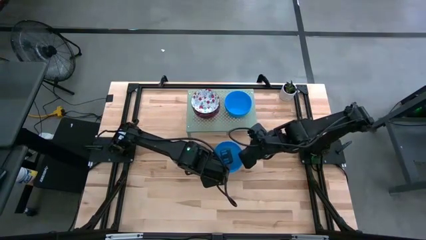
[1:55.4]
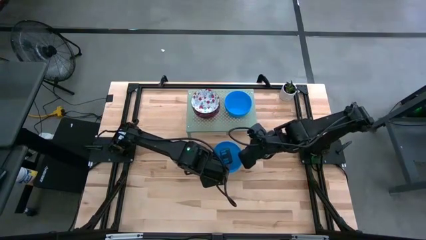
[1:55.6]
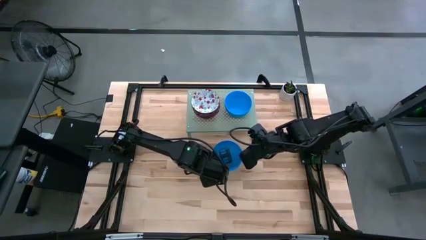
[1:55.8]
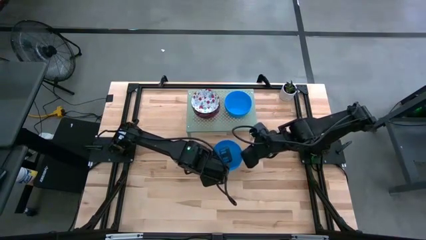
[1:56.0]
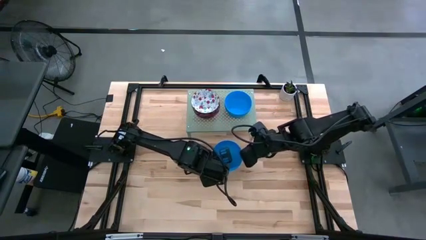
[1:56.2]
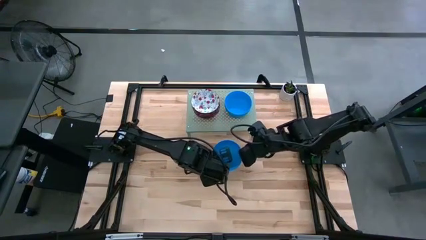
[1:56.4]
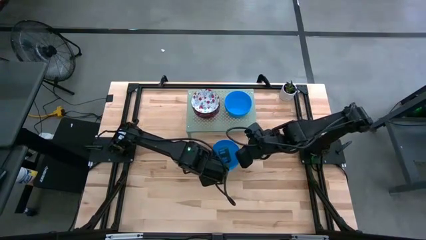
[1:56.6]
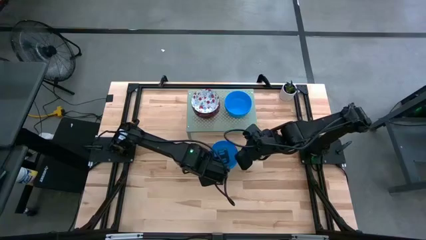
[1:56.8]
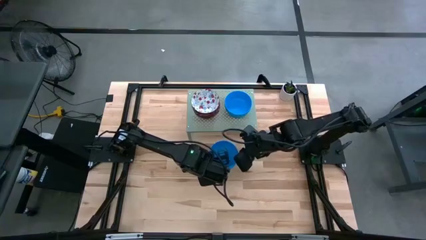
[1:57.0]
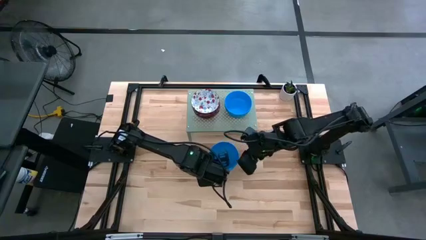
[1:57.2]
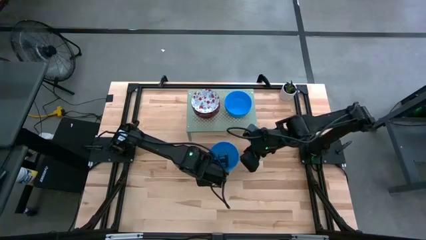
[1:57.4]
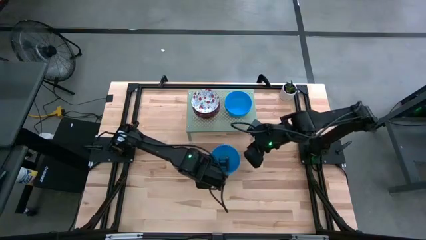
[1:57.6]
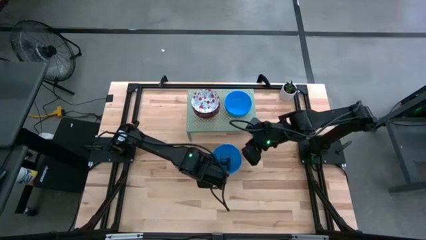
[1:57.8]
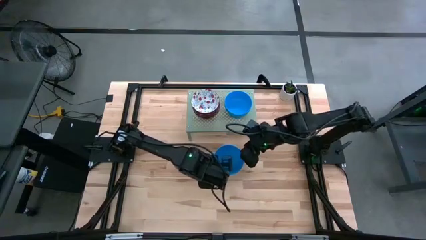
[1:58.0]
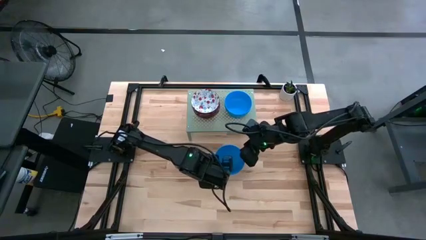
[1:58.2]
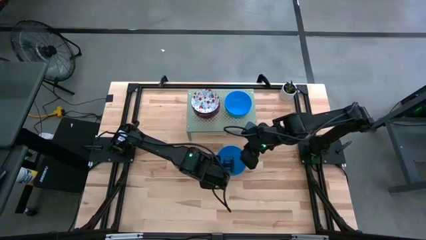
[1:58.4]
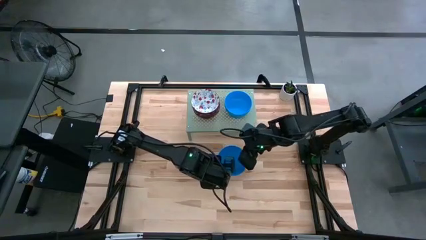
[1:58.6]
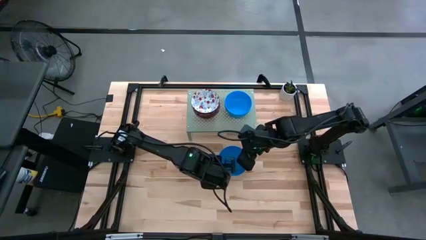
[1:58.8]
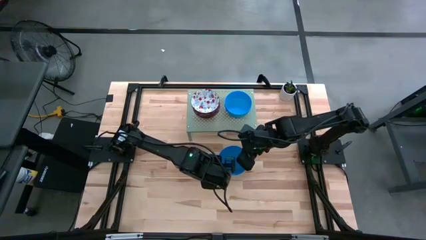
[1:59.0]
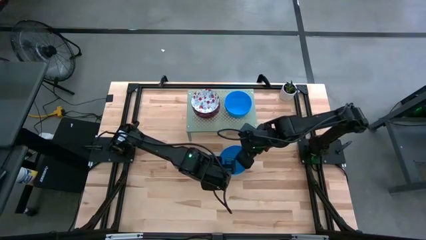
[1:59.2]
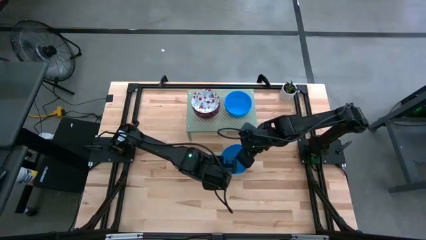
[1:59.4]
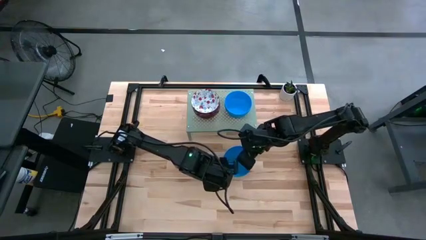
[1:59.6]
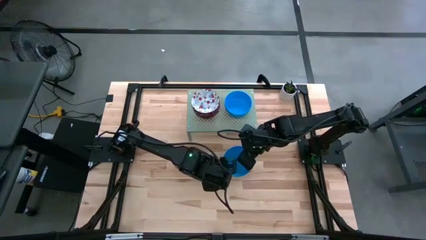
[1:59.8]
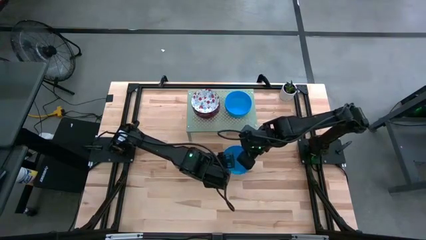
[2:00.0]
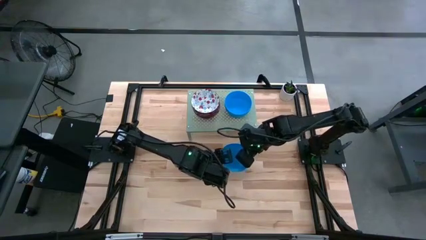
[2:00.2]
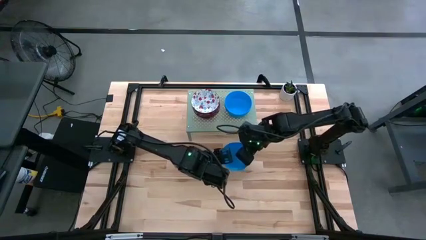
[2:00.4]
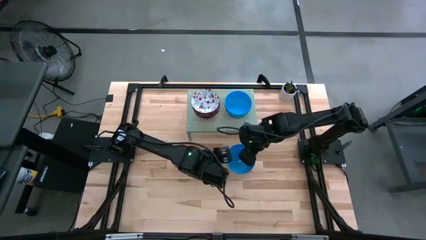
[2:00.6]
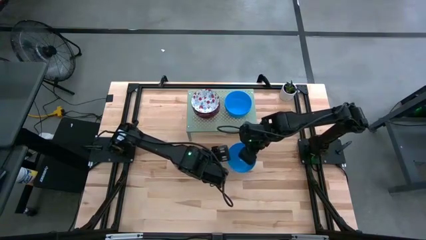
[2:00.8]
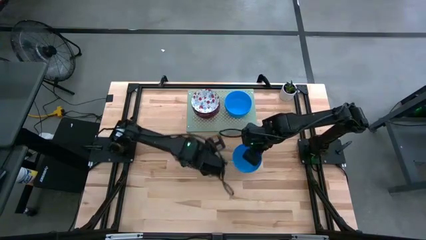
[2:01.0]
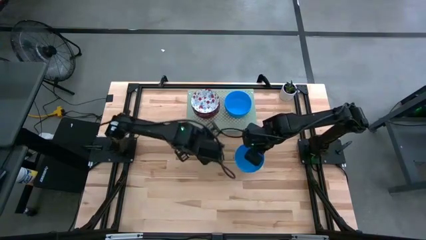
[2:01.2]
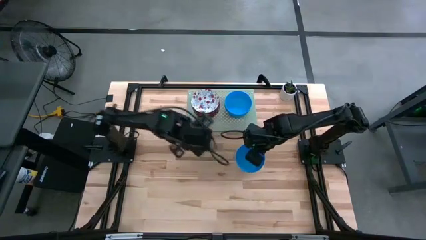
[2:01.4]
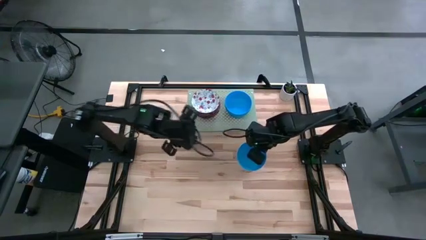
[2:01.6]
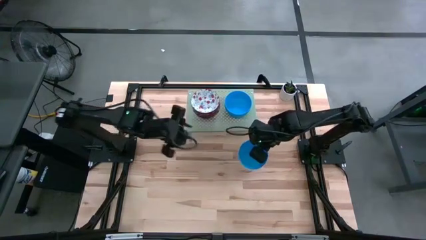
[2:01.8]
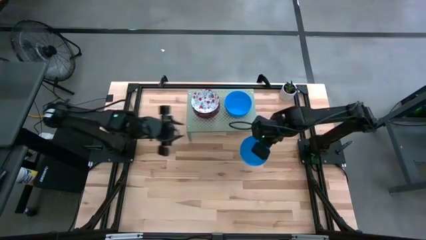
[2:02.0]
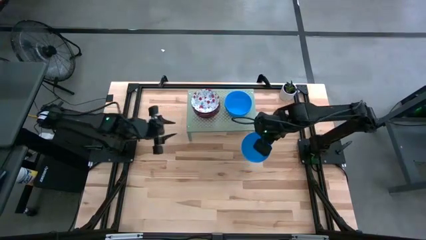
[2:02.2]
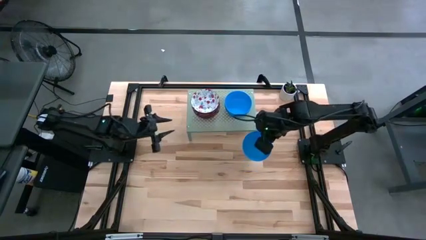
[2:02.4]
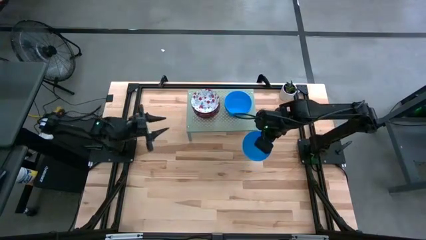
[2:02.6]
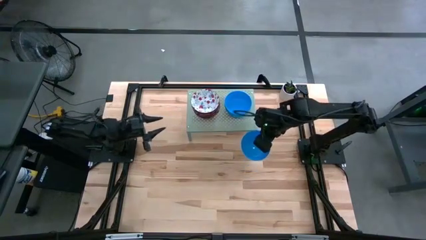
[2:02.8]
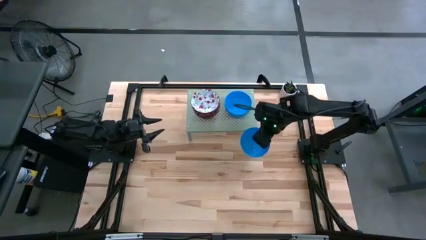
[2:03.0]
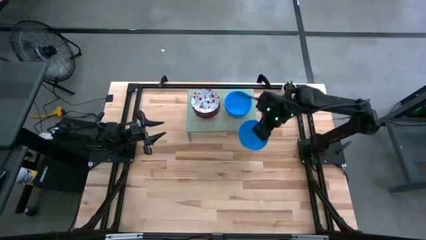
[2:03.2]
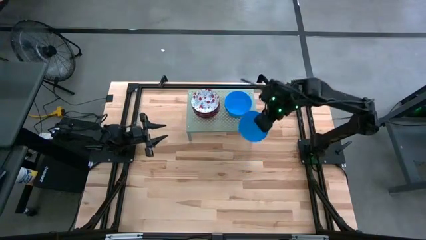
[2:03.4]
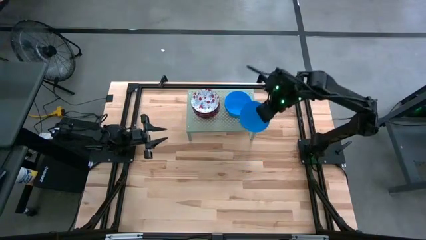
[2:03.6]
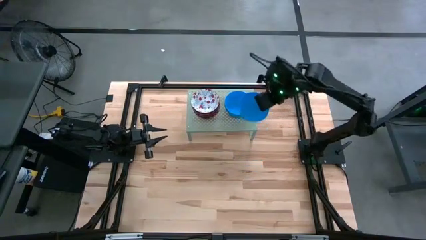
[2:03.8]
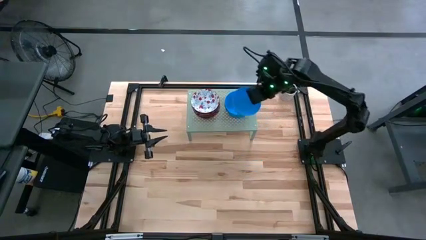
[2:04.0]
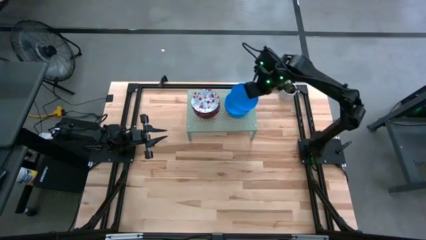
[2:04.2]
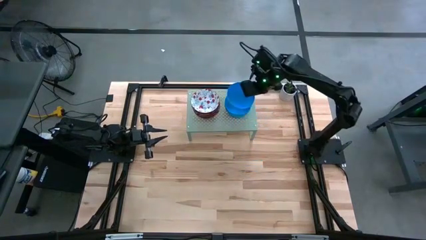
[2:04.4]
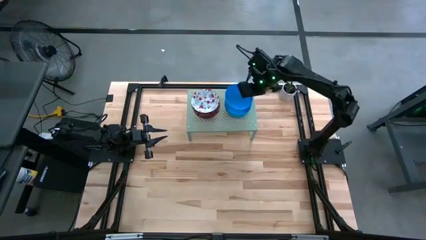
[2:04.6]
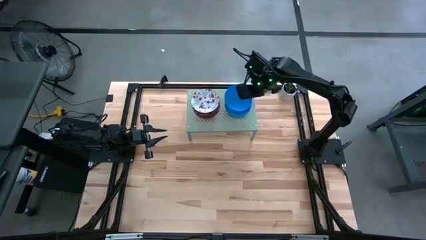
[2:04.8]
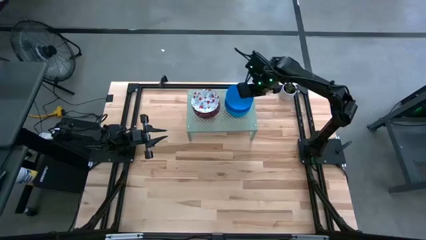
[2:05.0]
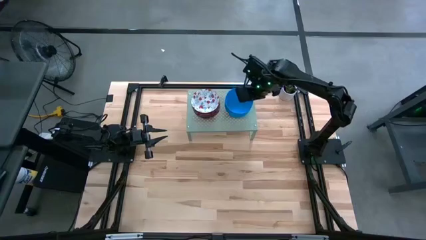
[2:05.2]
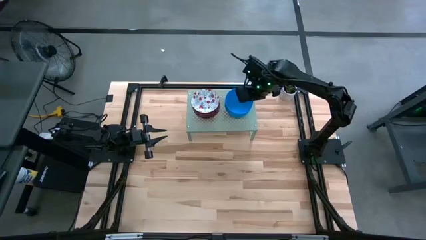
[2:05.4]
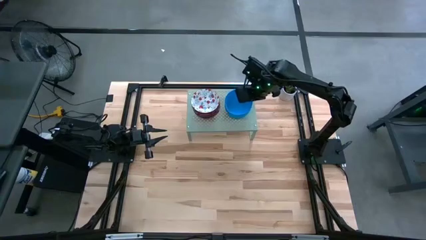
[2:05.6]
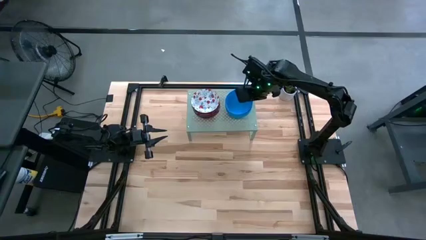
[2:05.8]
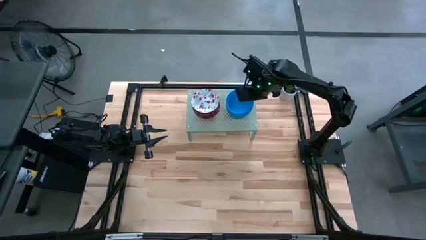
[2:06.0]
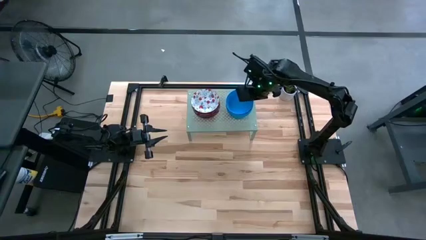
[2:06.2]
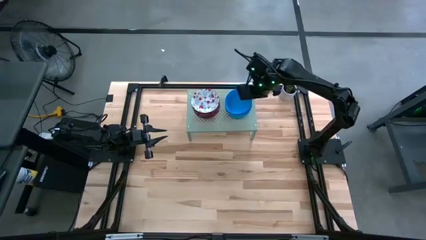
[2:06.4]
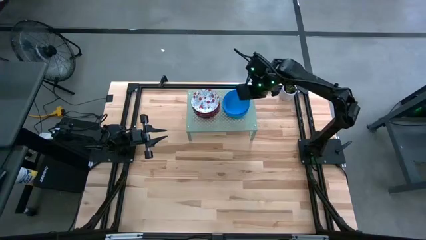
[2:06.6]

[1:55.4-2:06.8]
Task: Pick & Place Mini bowls
Stack the light blue bowl on the stacked light blue bowl on the shelf

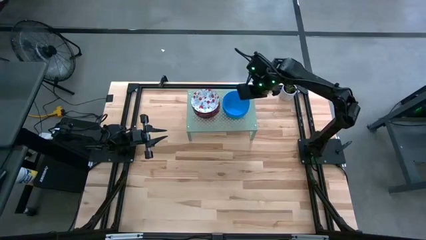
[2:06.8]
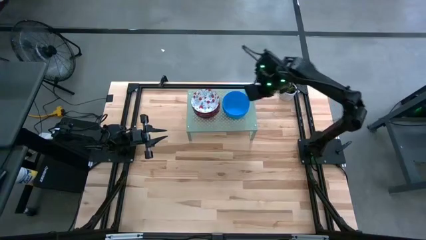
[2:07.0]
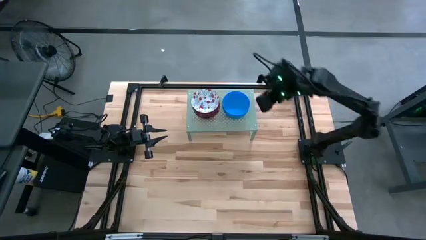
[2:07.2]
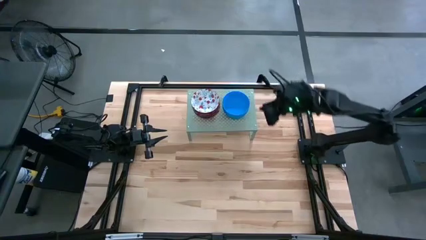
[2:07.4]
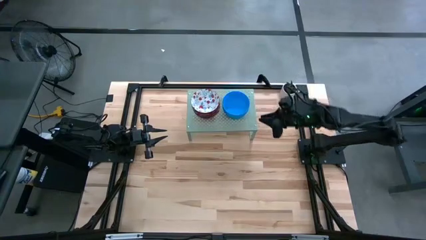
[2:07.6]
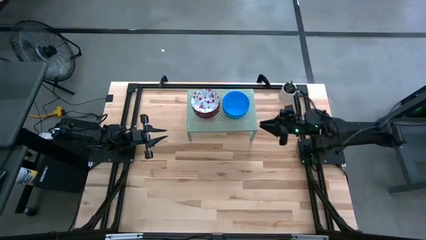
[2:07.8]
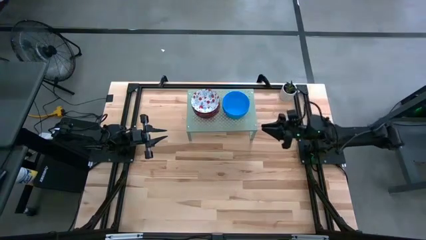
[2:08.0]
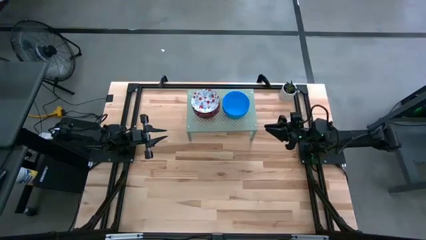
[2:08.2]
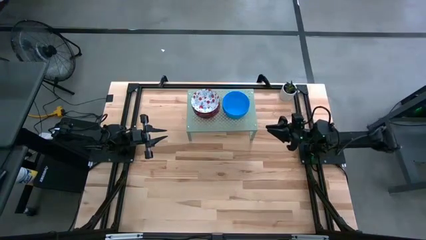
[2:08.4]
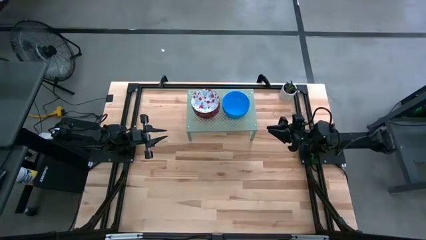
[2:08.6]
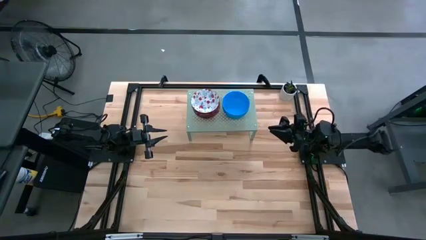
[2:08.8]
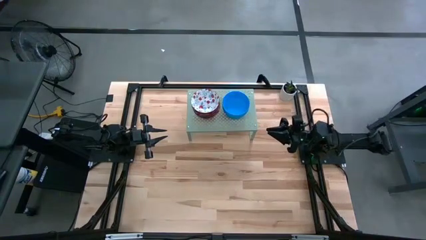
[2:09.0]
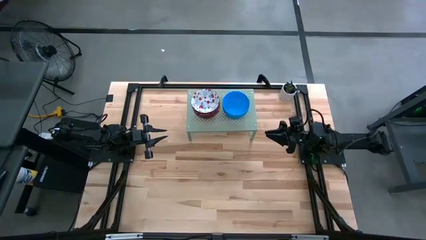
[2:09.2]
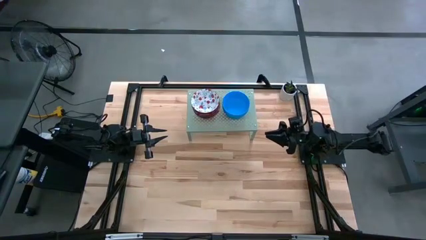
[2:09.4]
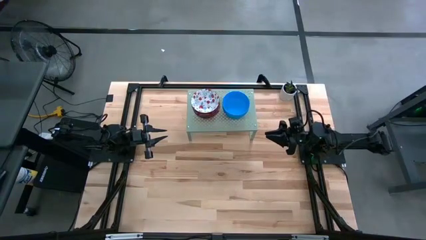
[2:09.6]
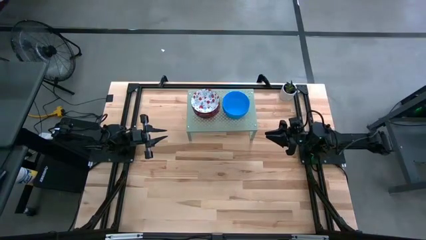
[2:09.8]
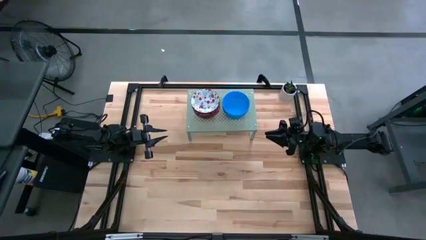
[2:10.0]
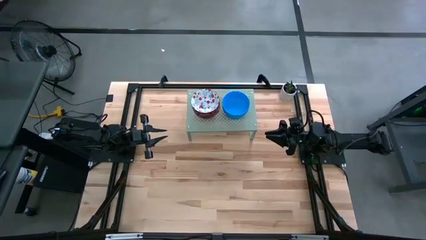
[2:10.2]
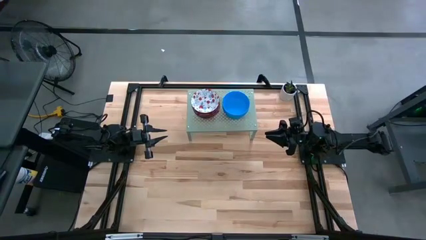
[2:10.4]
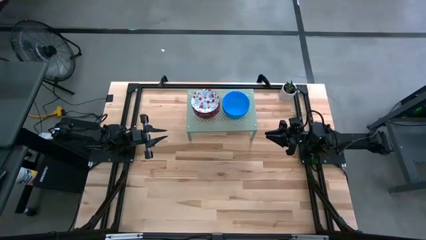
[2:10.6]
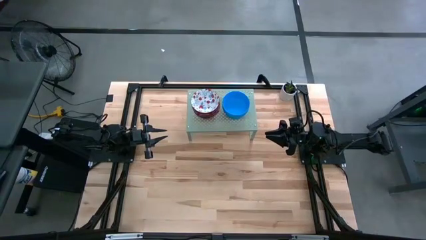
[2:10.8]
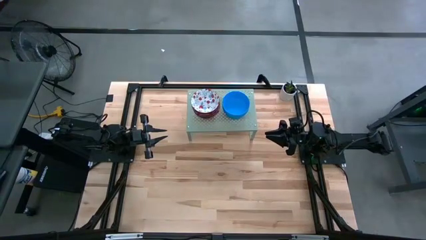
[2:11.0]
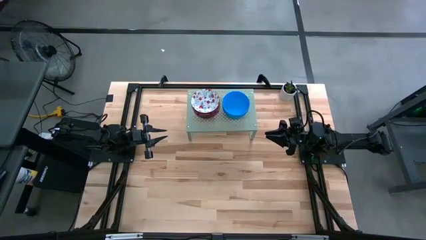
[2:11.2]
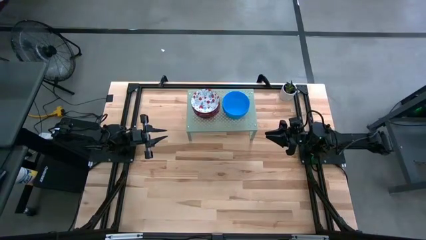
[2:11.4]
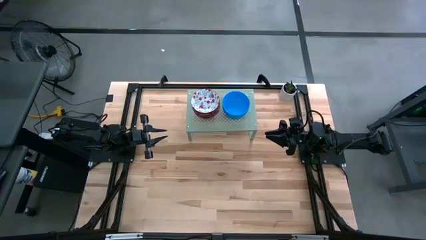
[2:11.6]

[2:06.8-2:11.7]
Return to Home Position
